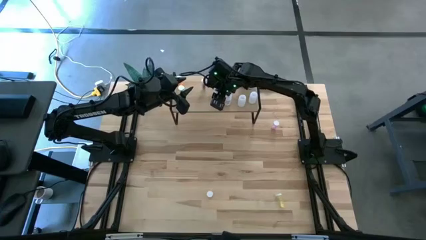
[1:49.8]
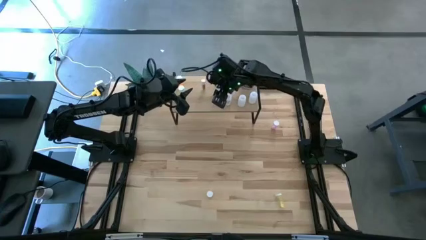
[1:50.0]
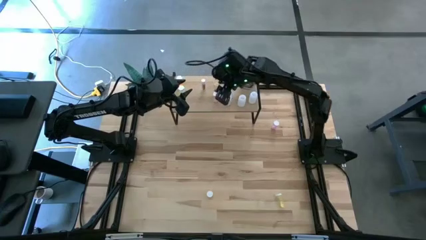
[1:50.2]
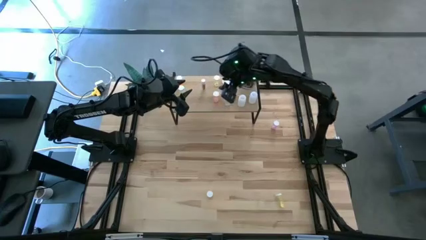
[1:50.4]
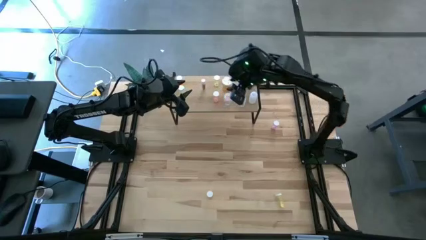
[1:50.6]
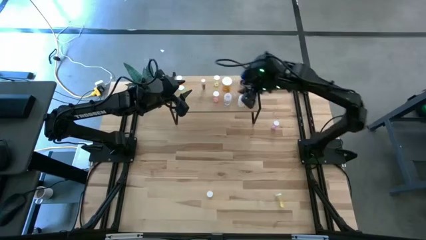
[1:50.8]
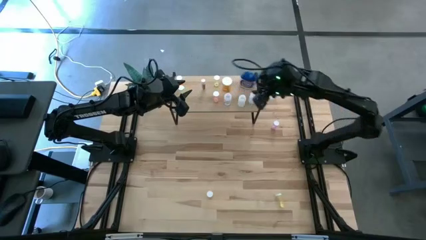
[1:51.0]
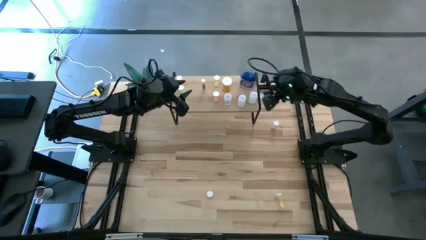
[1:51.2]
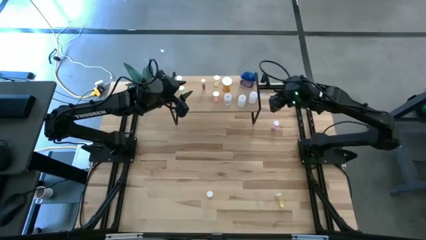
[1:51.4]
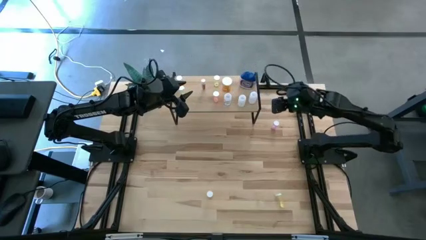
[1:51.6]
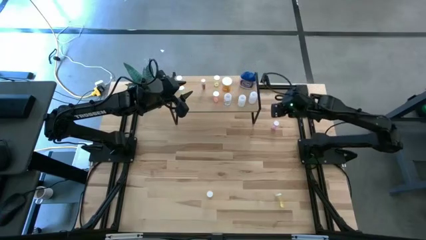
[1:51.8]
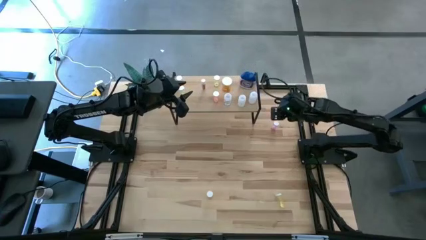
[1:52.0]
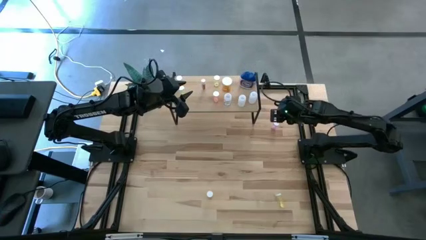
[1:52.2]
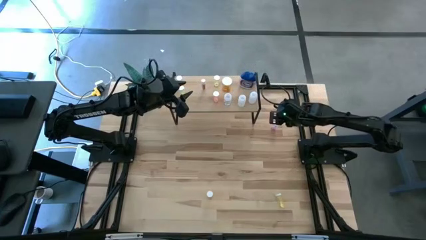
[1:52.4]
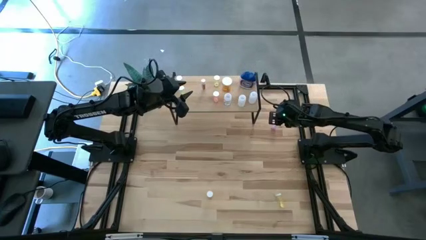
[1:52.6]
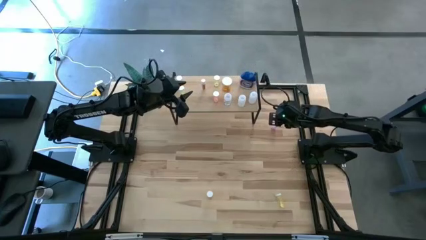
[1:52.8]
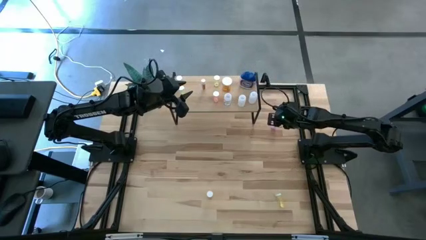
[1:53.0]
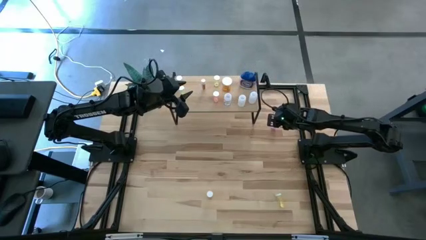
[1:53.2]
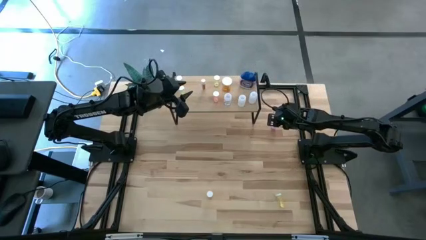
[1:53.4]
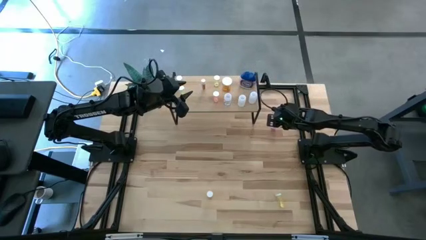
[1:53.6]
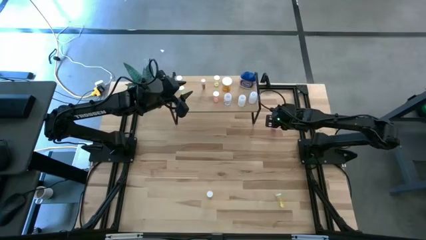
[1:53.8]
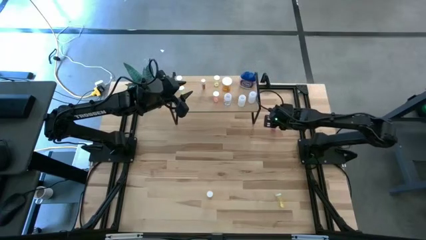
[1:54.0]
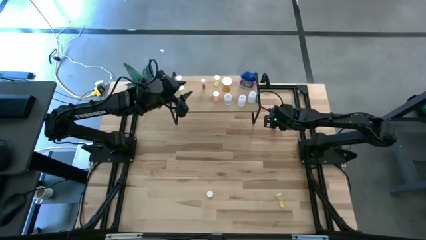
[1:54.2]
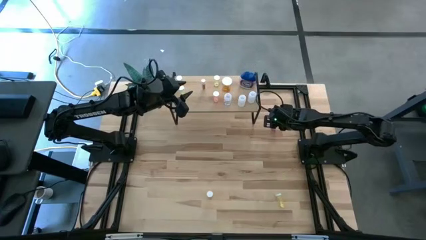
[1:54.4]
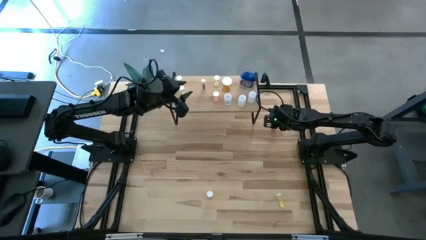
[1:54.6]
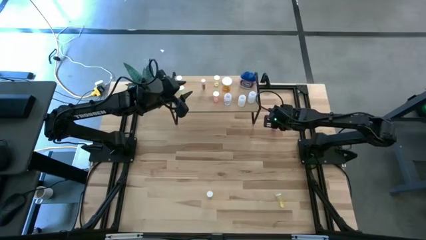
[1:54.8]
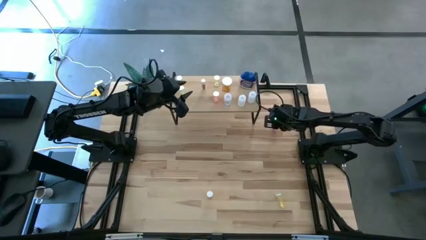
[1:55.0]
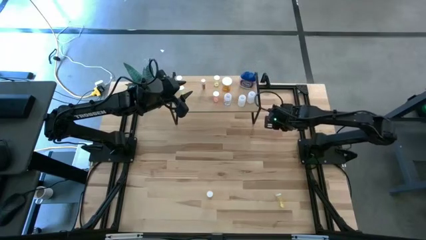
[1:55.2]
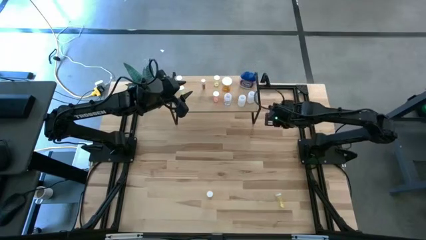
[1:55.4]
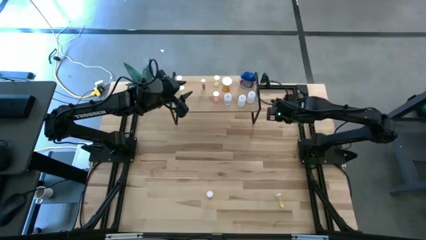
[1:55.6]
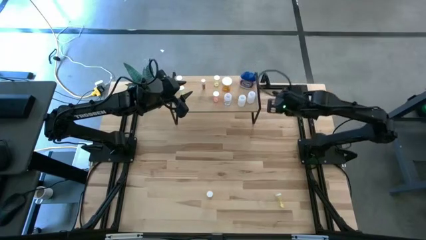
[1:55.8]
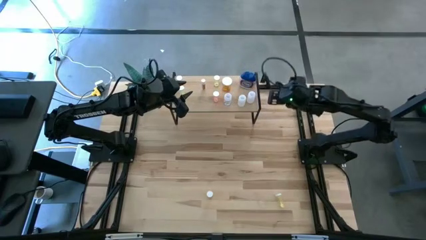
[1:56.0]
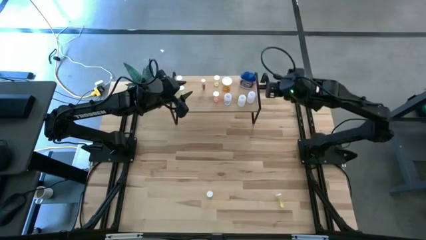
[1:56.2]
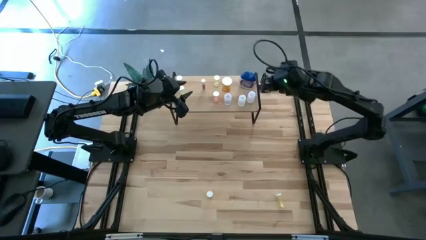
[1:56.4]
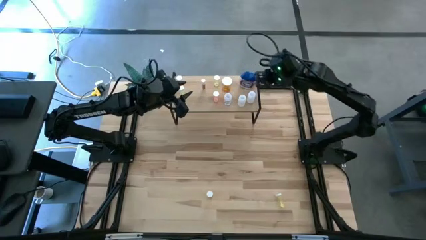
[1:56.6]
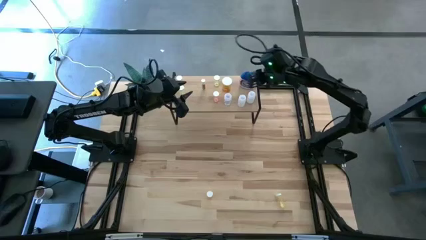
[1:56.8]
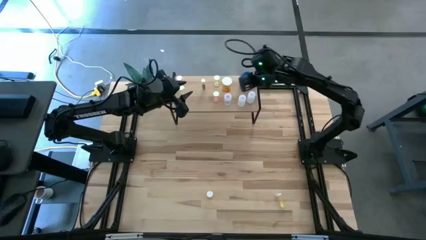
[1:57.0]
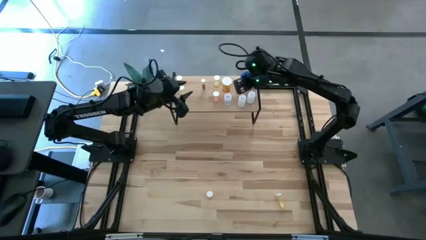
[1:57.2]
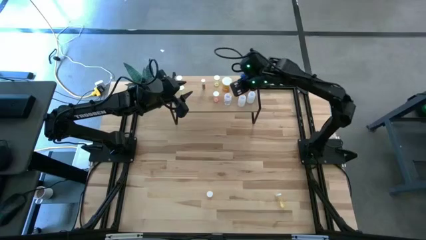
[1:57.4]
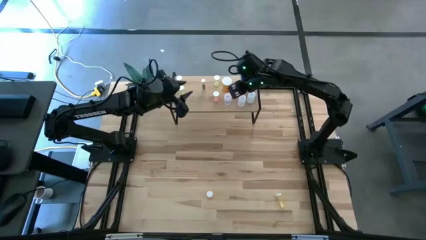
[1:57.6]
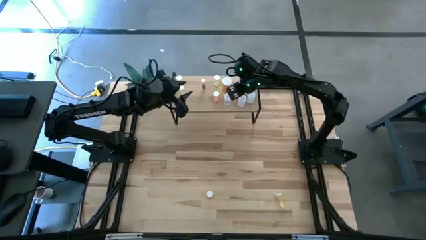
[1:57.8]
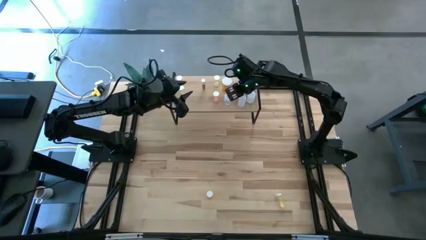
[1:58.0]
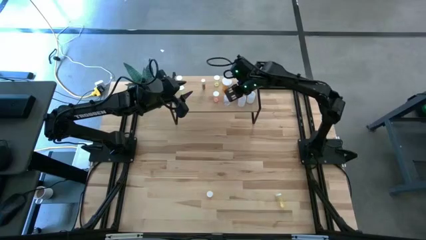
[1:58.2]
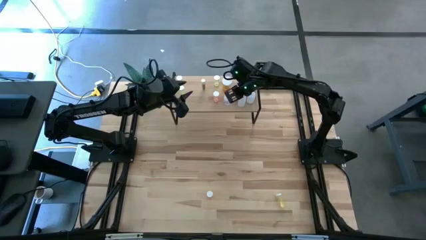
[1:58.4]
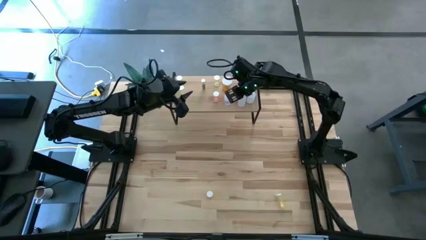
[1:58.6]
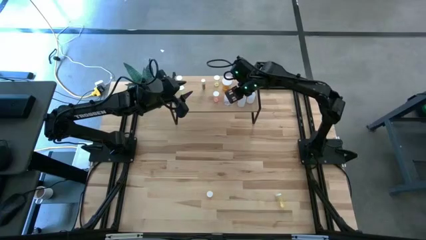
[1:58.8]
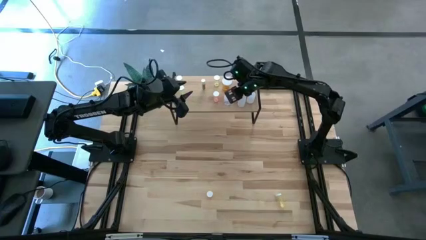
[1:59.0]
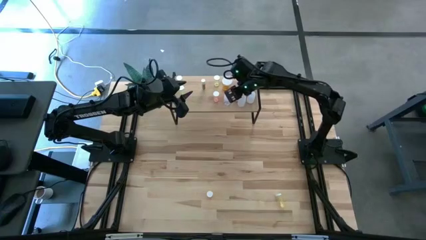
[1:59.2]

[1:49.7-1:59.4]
Task: Pick and place medicine bottles onto shelf by color
Put the purple pill bottle on the shelf

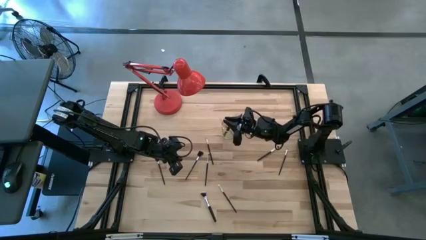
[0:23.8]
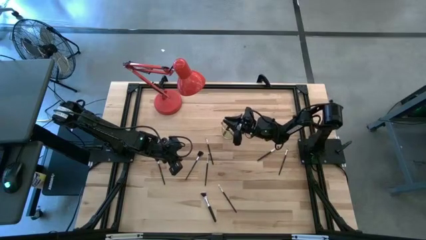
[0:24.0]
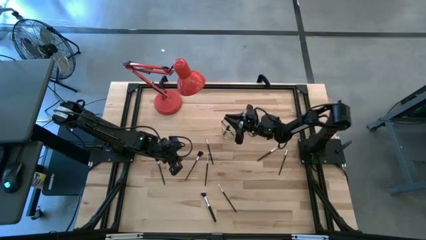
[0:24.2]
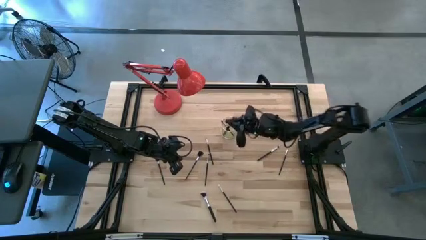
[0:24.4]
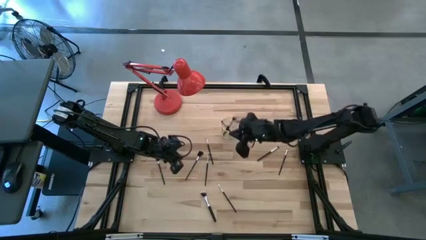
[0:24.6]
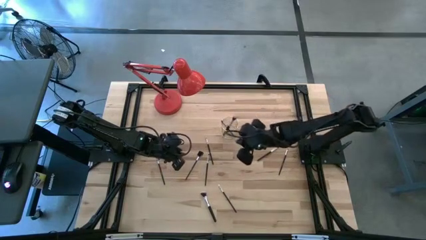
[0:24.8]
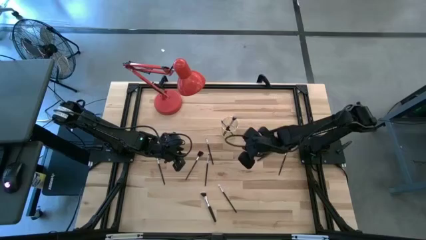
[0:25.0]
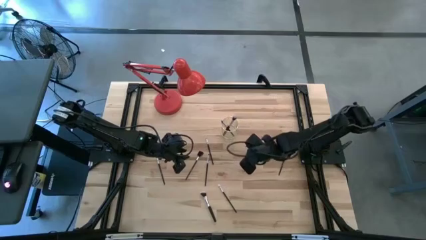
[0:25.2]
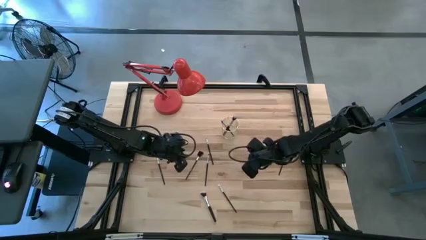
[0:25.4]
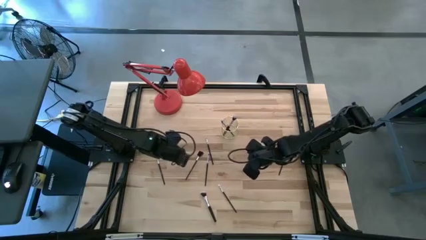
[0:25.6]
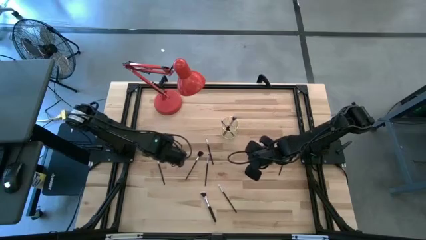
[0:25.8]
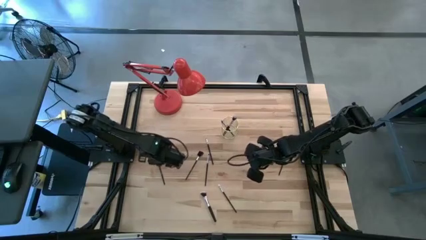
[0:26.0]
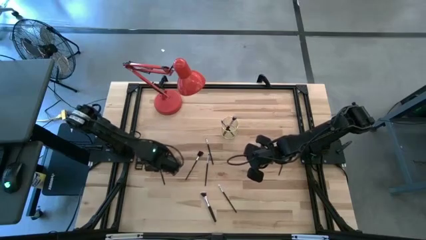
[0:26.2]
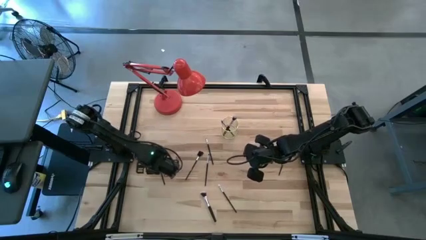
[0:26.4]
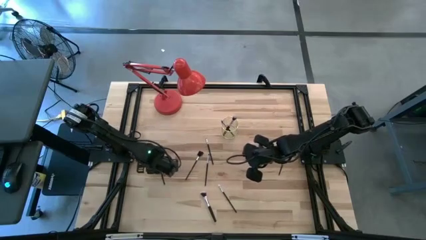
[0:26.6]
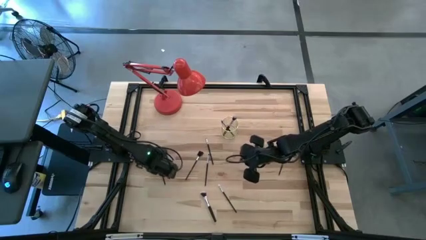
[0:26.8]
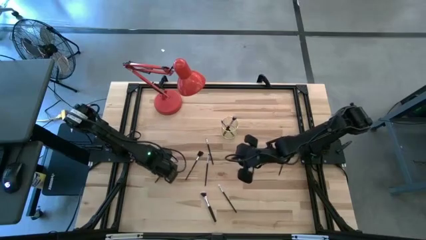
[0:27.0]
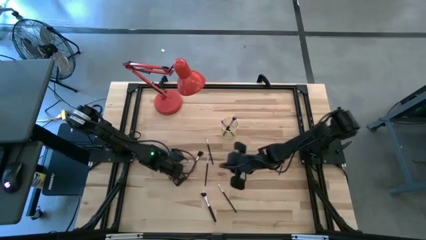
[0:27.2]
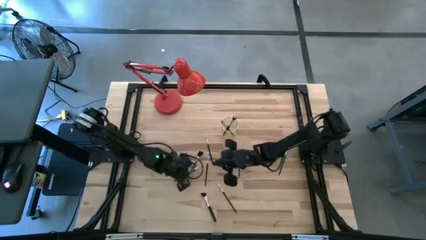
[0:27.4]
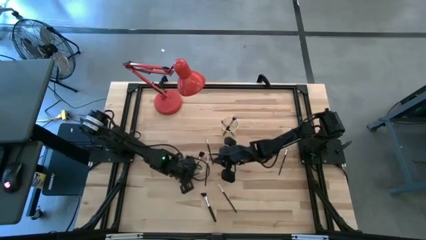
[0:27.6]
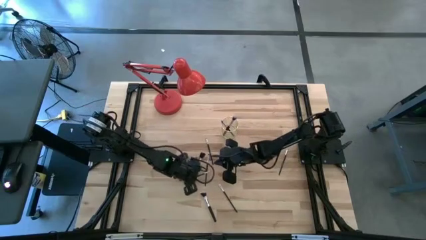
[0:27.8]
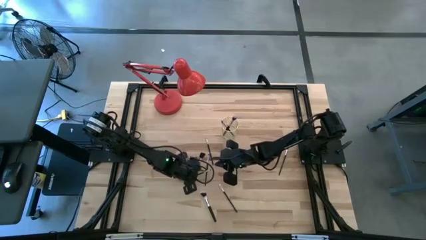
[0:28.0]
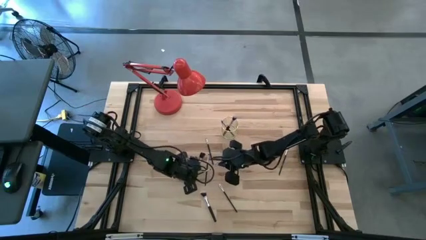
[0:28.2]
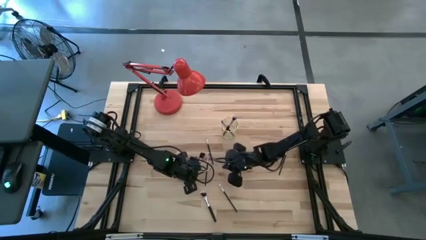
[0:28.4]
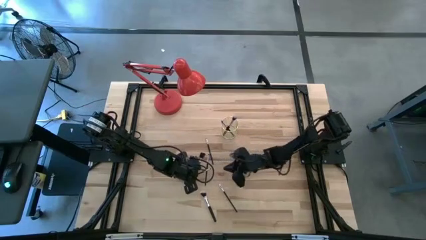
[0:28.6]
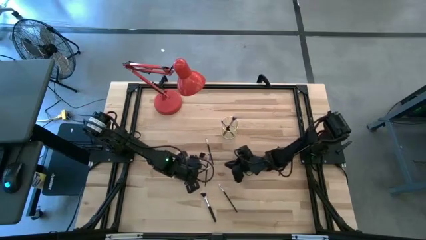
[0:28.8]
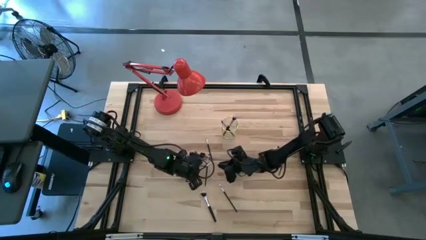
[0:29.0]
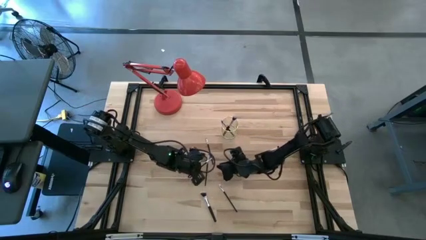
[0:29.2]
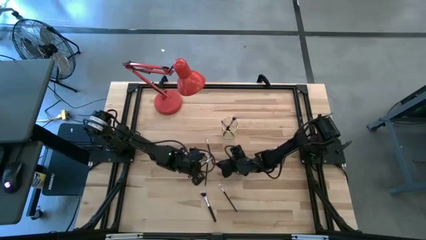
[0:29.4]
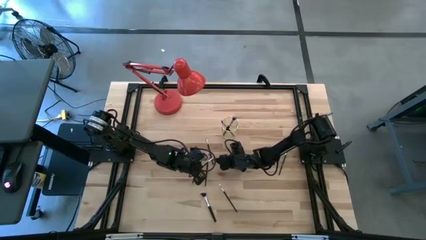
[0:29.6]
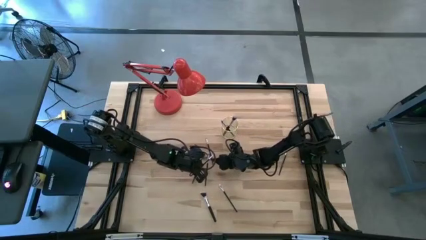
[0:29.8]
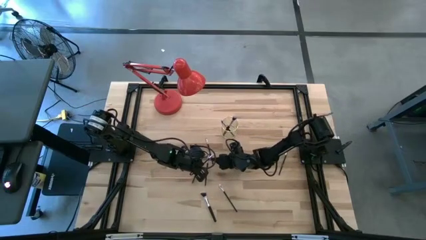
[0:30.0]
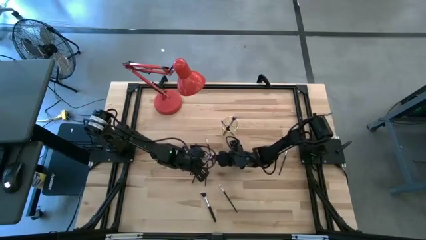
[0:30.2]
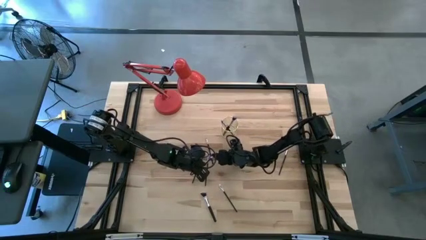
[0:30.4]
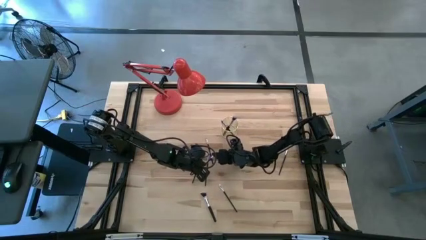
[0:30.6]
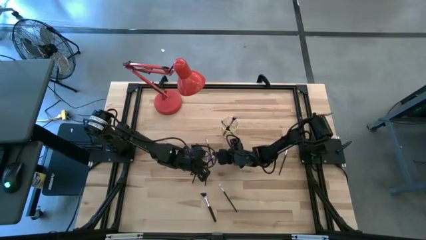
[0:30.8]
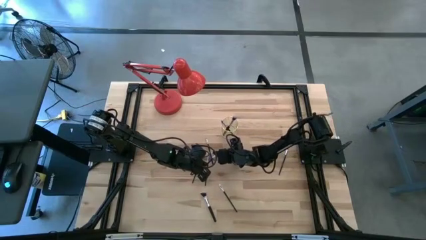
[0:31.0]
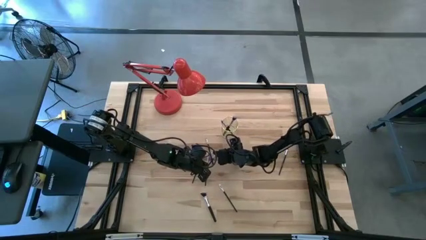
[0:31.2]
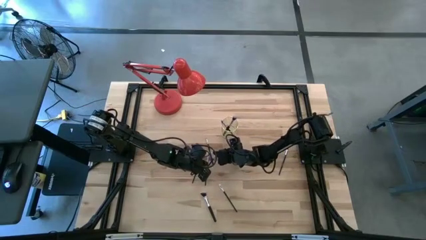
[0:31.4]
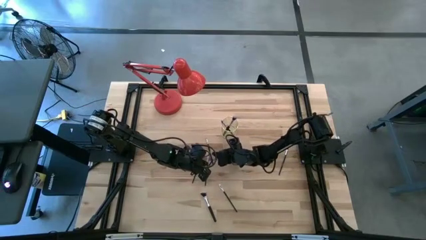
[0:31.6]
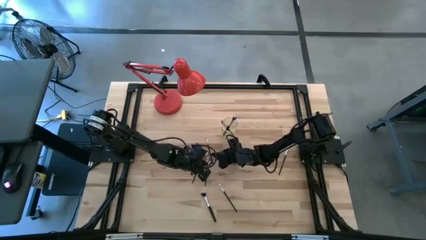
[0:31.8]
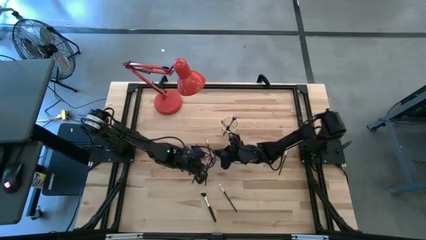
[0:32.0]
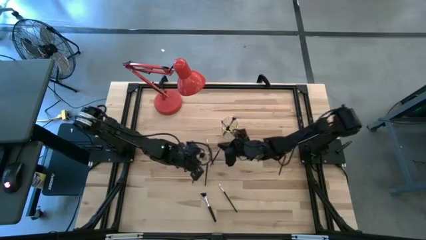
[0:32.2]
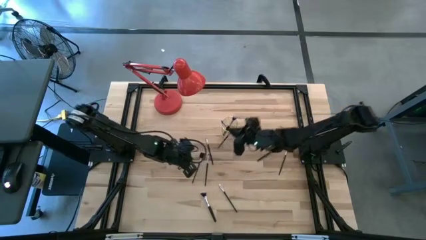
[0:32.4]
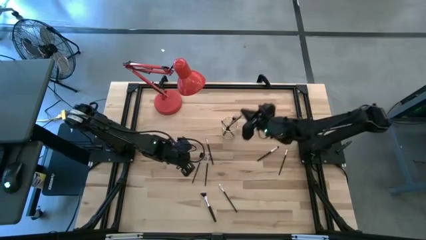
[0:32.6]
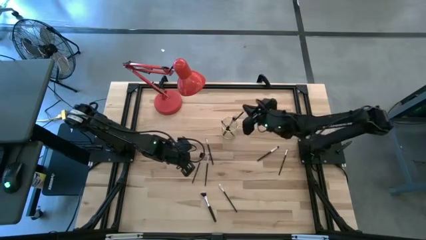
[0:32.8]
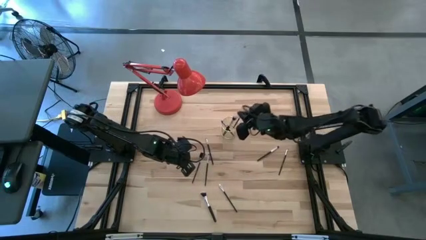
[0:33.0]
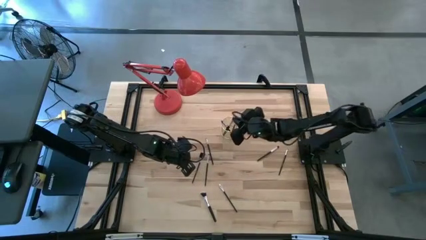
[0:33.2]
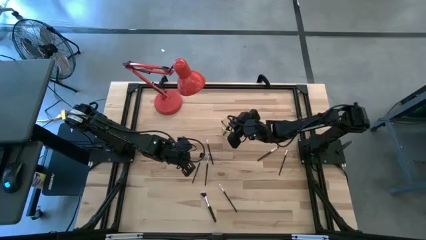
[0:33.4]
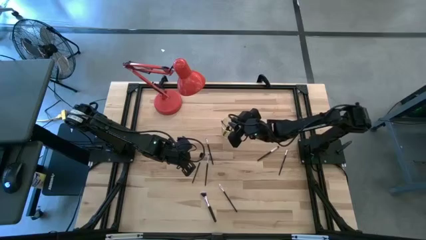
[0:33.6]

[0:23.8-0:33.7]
Task: Put items in baskets/containers
Put the black eyeshadow brush into the yellow container
